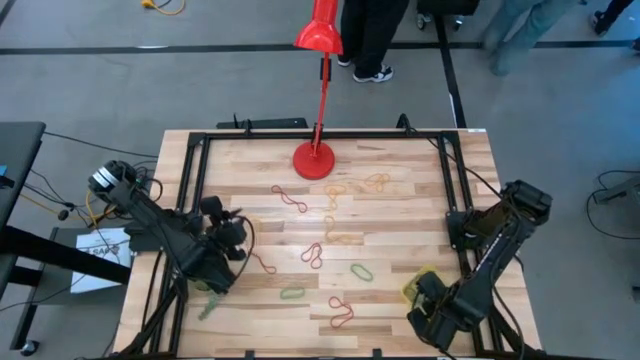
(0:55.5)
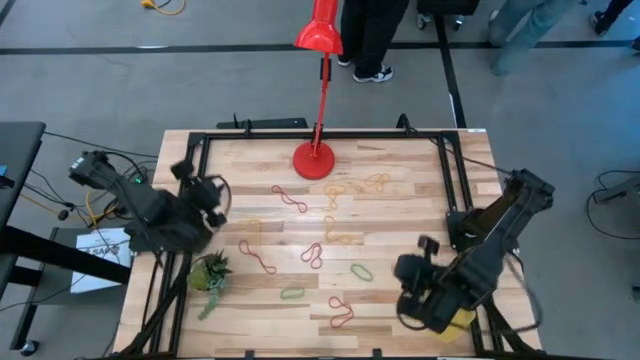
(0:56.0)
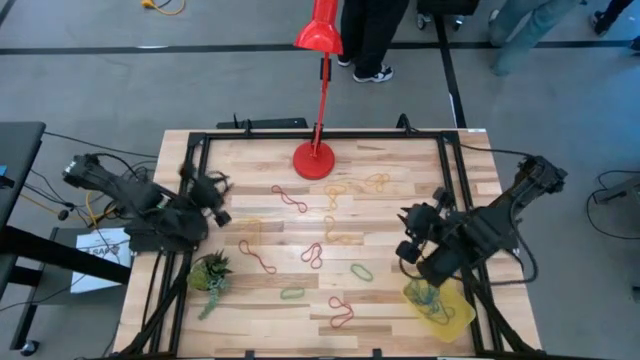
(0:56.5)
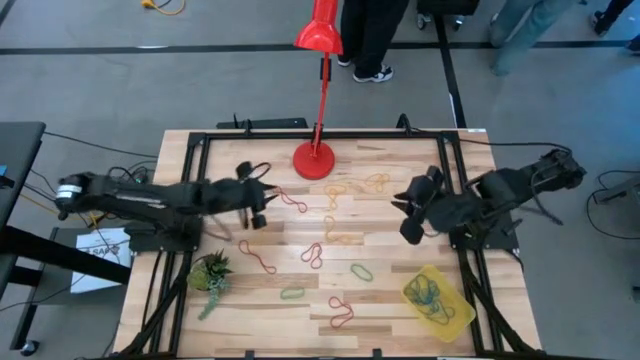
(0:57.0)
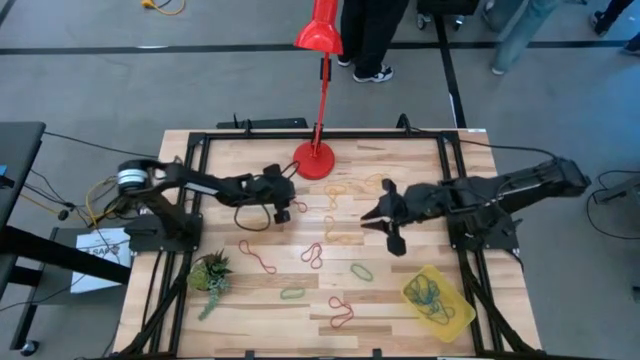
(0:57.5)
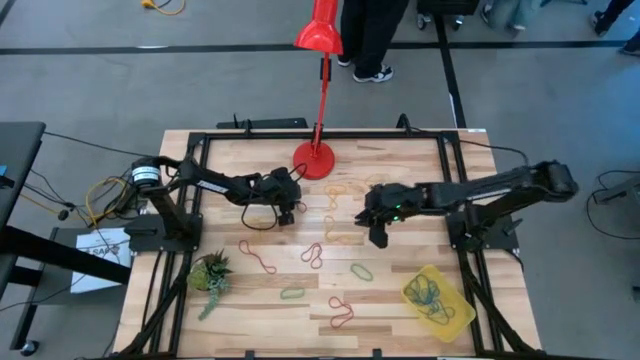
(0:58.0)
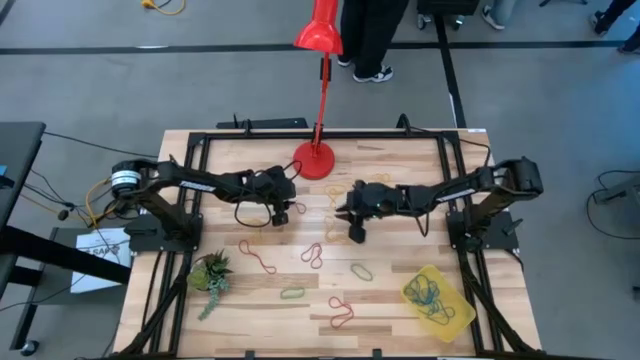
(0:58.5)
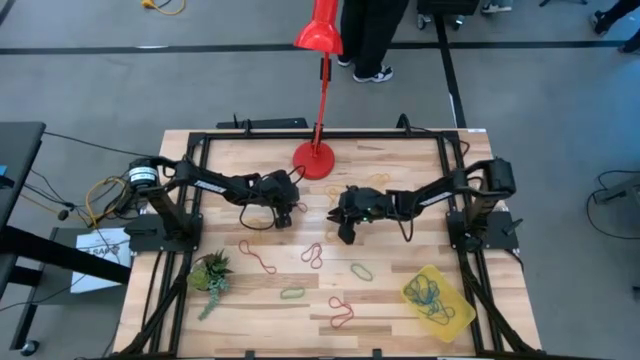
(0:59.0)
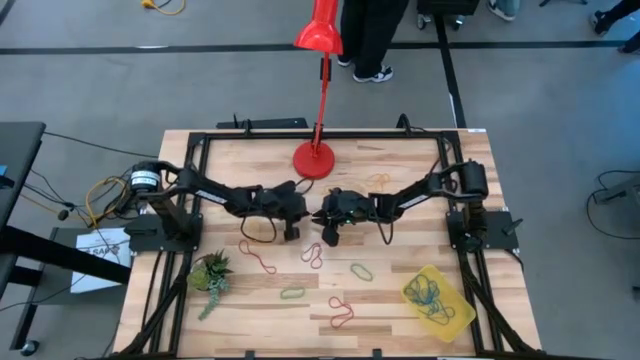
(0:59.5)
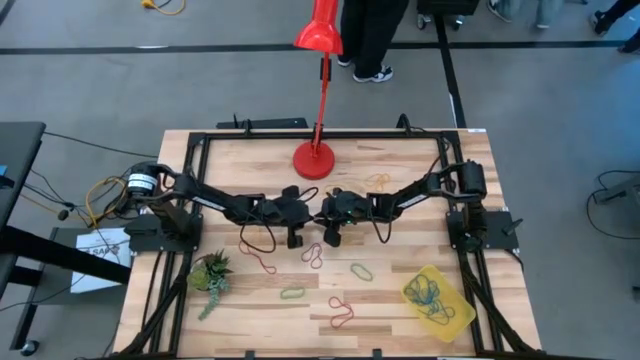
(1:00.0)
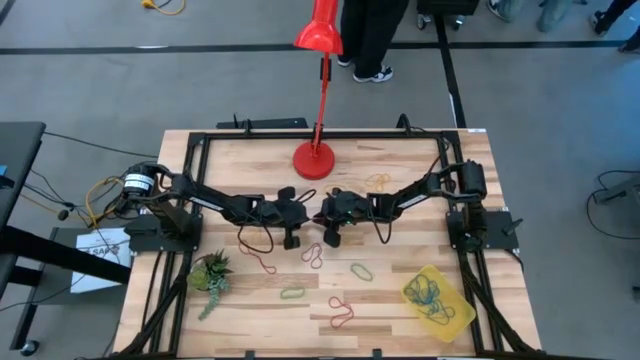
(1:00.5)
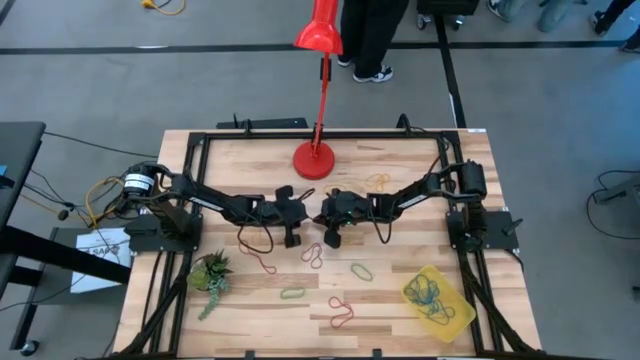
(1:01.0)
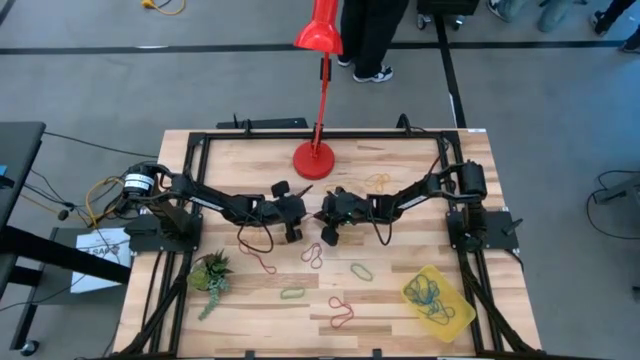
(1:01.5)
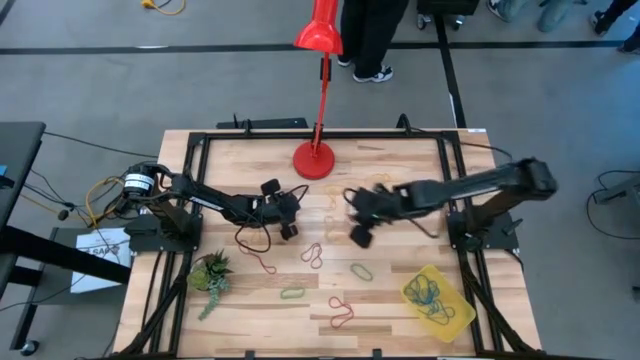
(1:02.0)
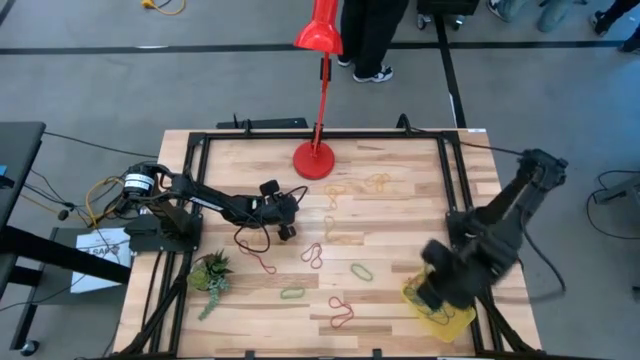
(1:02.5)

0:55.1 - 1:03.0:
Task: Pick and place rubber bands into bin
Put the red rubber band into the container

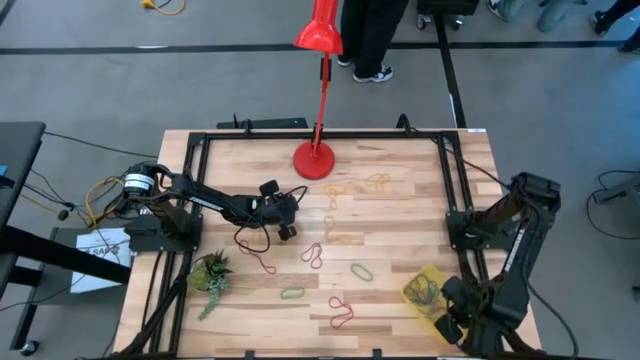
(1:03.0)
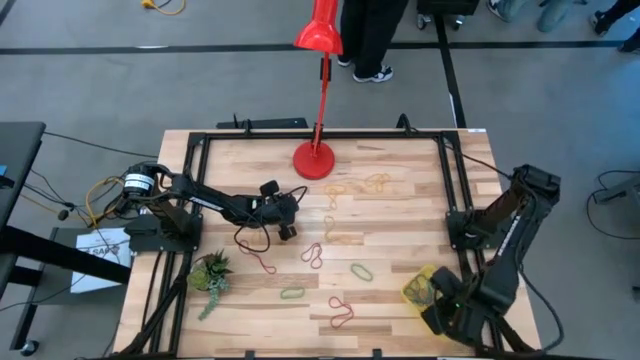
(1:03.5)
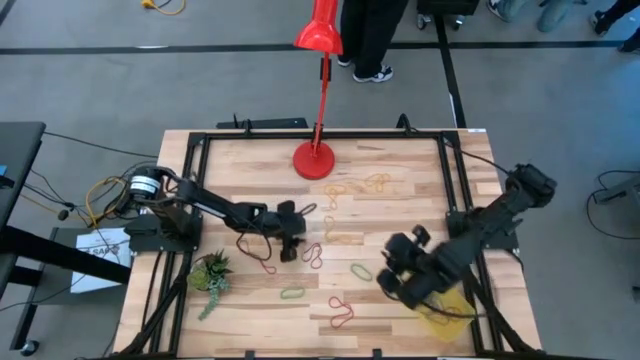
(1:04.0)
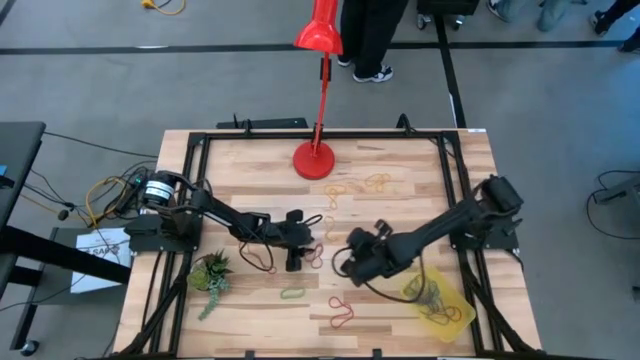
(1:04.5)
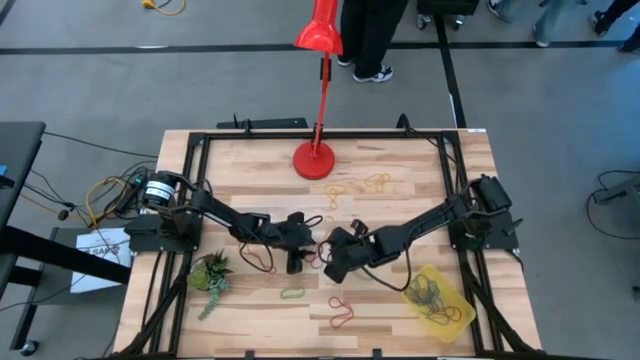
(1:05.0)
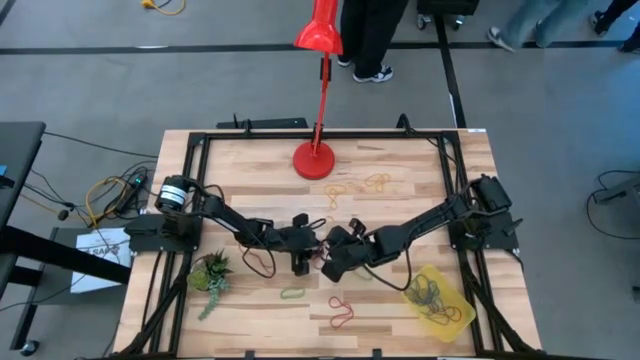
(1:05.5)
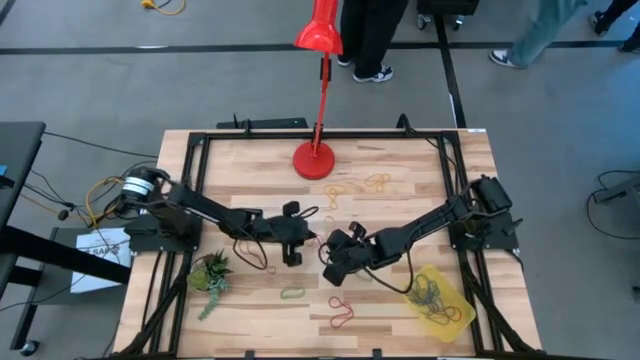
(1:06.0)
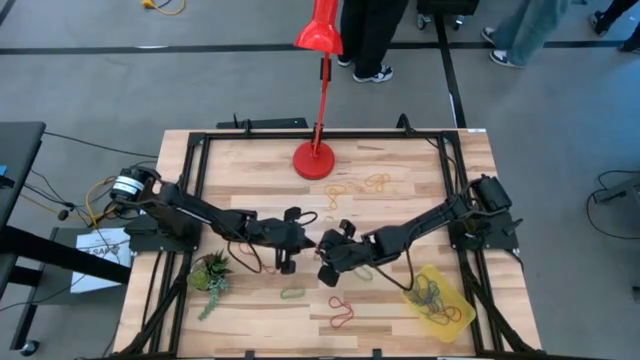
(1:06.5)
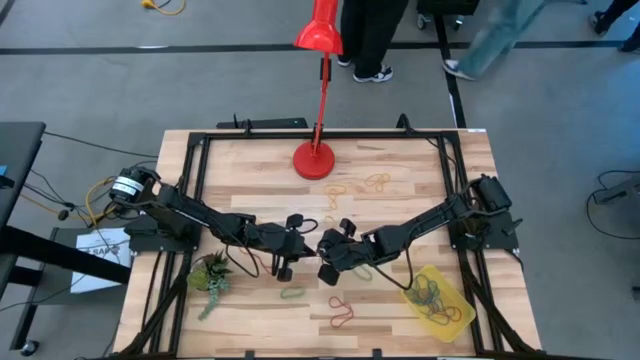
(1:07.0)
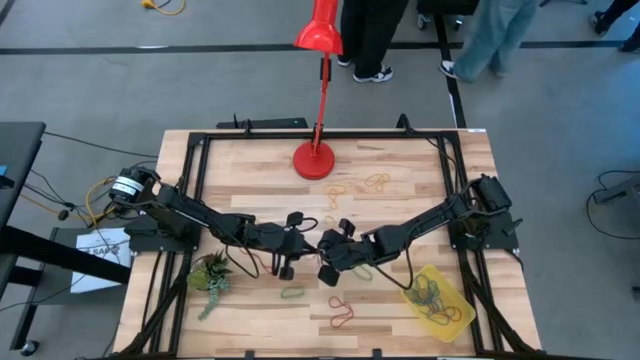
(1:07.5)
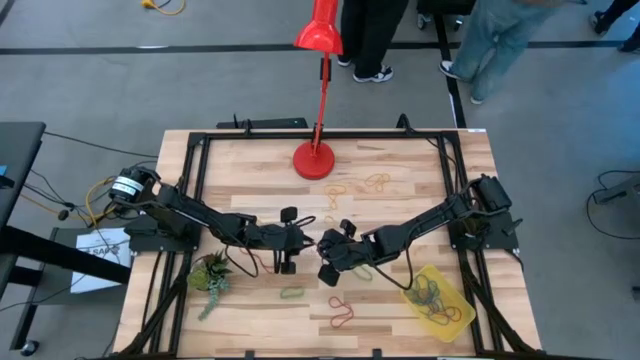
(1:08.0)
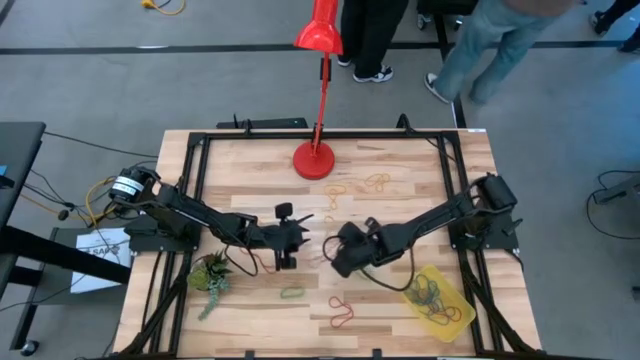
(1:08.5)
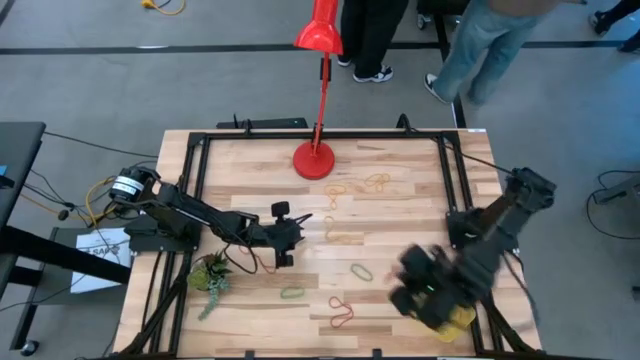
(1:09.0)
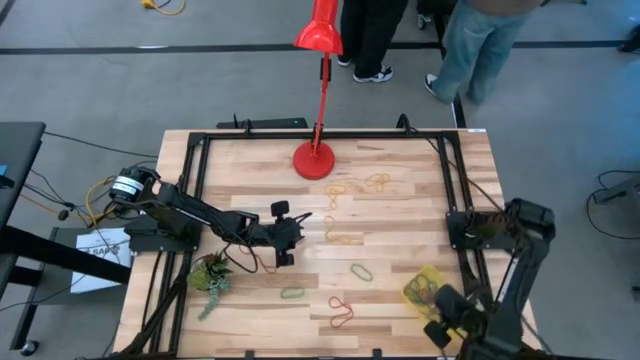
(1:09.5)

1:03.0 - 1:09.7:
Put the red rubber band into the container

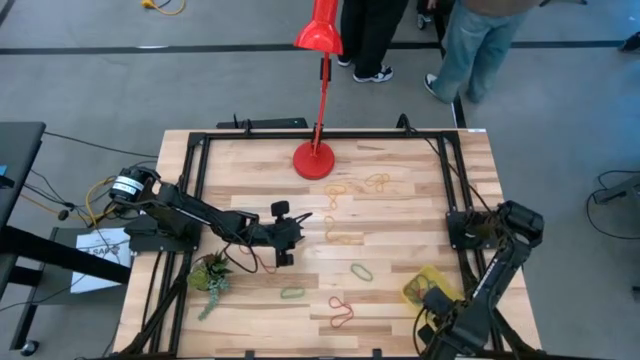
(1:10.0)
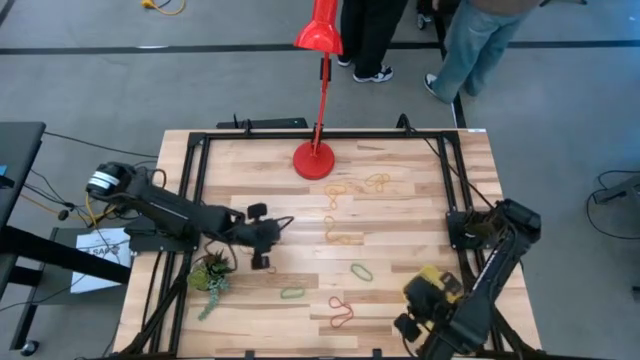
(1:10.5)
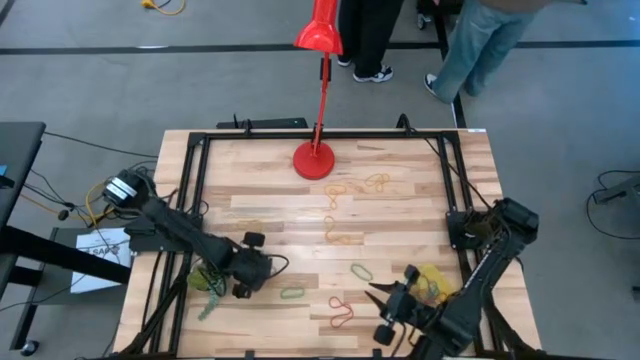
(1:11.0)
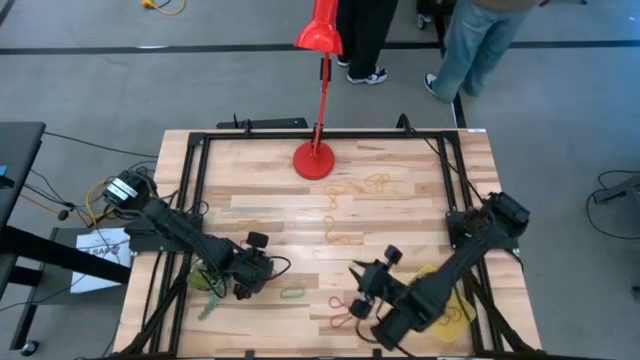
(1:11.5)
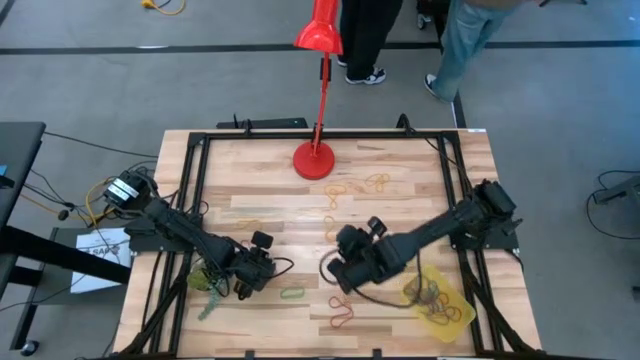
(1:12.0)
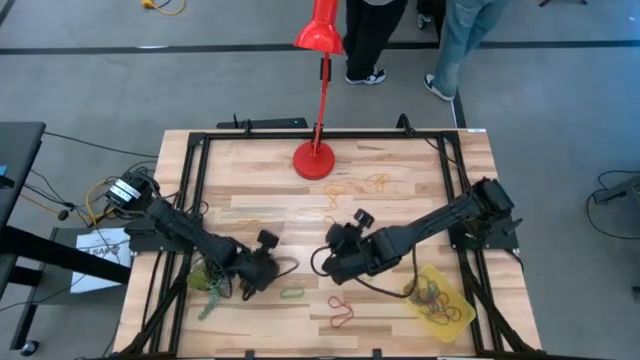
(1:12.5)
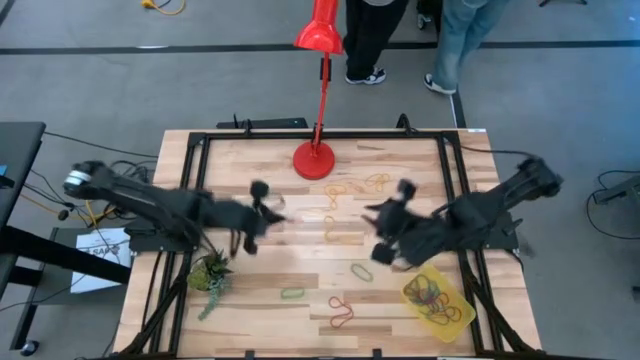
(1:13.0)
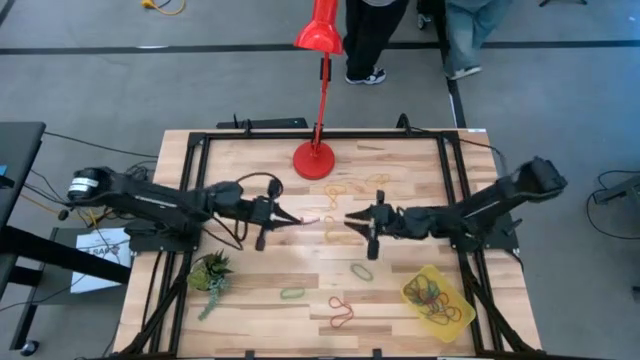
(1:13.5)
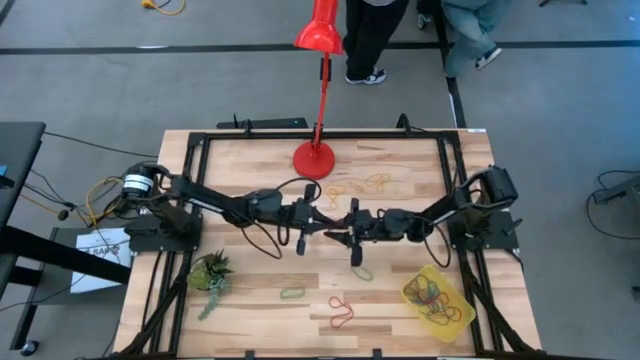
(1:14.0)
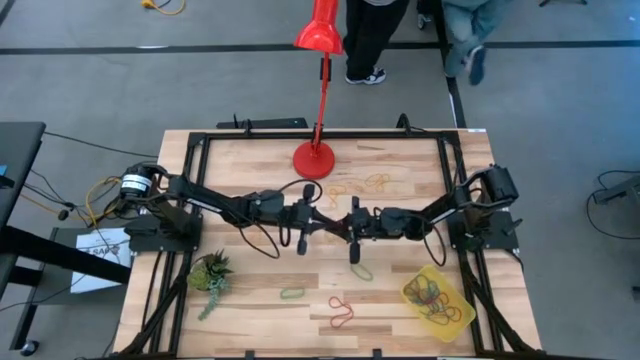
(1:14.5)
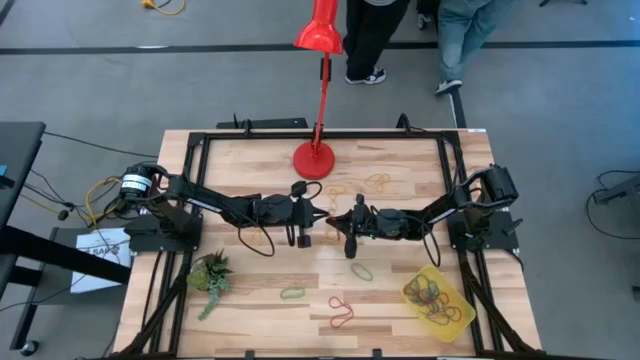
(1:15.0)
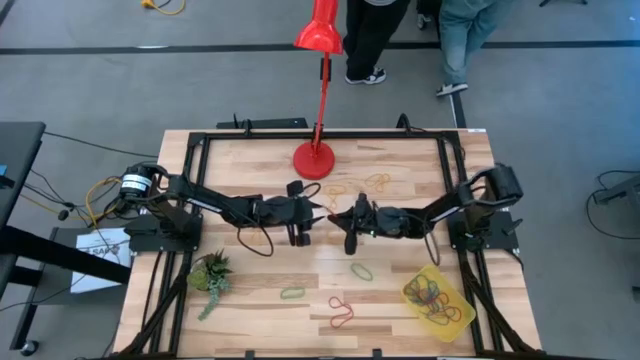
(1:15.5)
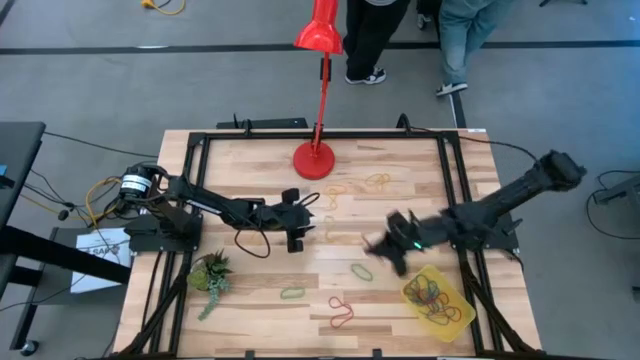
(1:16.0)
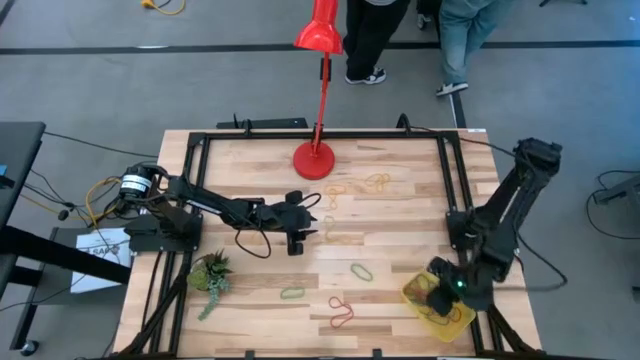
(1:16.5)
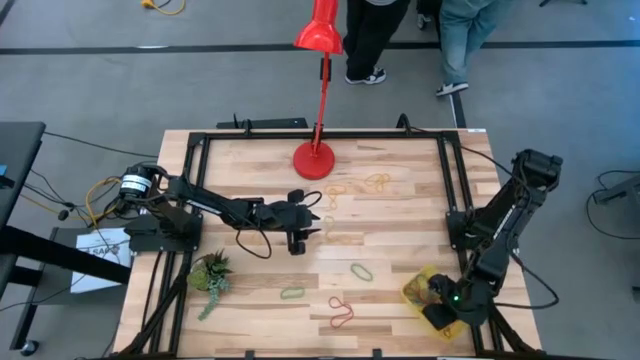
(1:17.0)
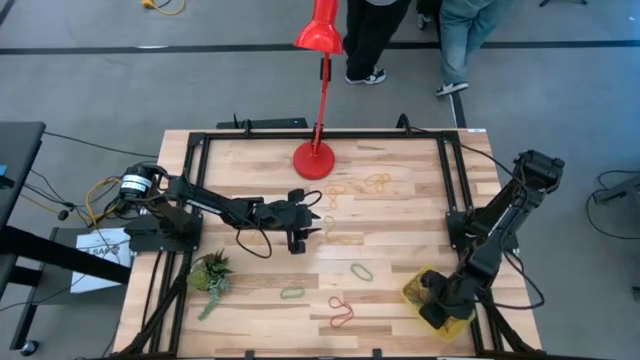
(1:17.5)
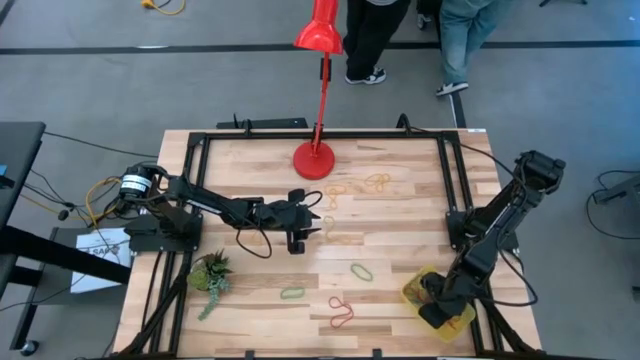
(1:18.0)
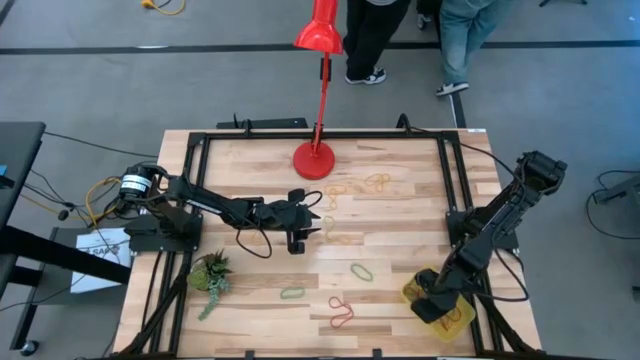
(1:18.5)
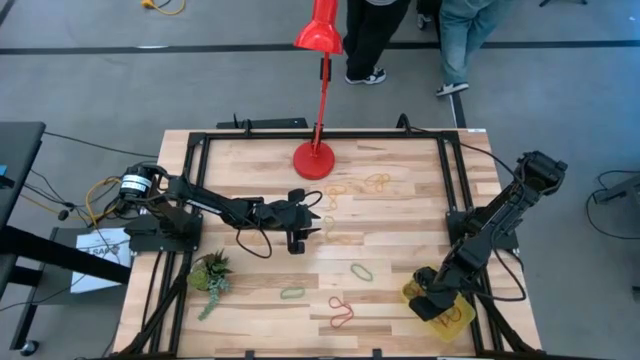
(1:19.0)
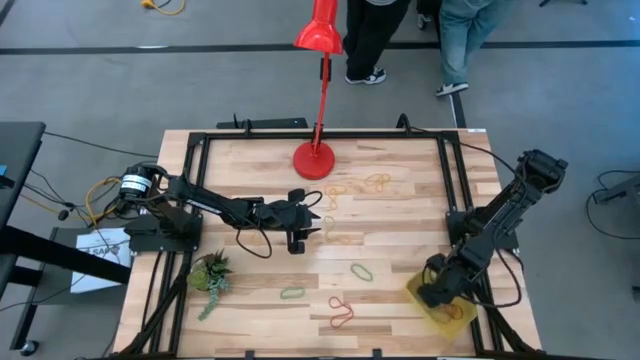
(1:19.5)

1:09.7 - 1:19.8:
Put the red rubber band into the container
